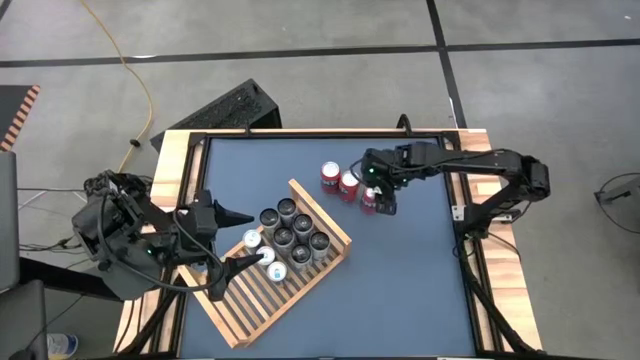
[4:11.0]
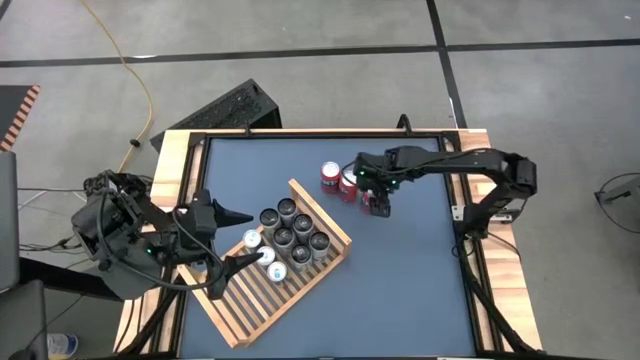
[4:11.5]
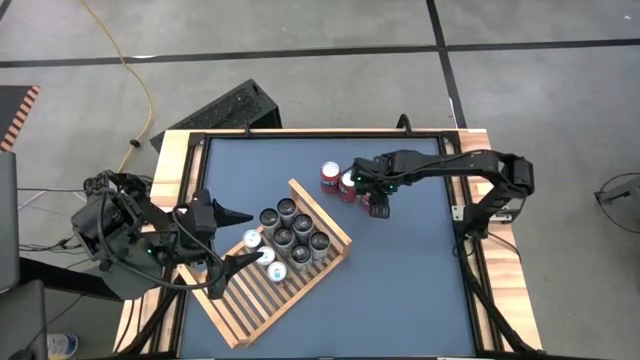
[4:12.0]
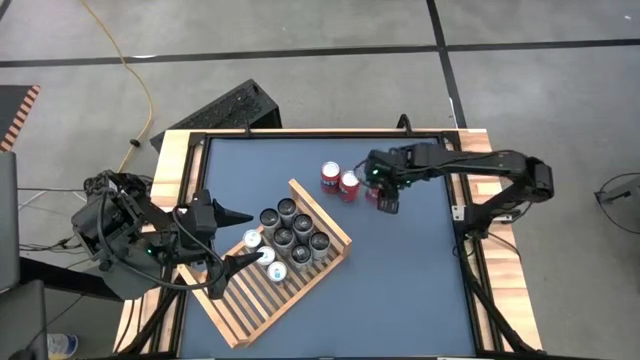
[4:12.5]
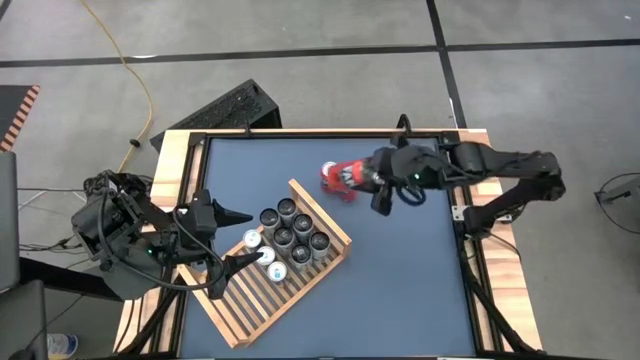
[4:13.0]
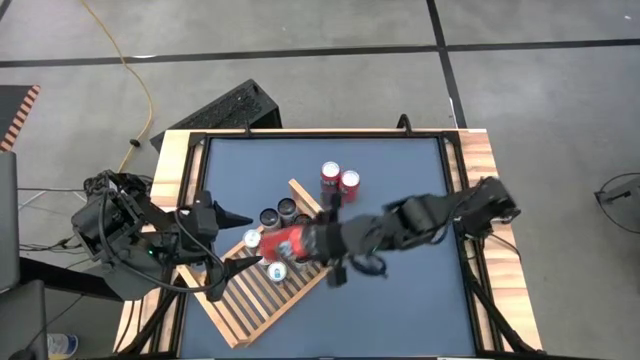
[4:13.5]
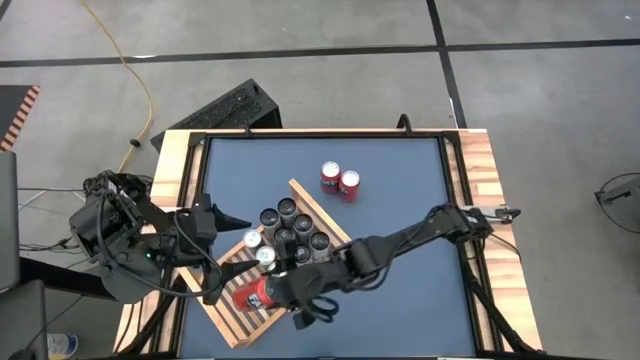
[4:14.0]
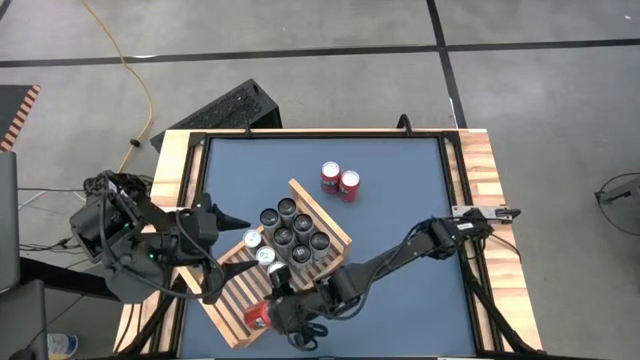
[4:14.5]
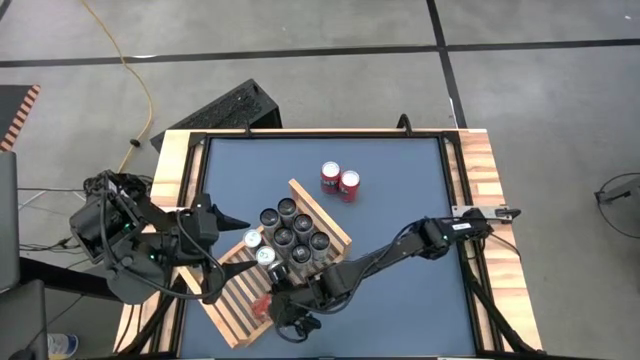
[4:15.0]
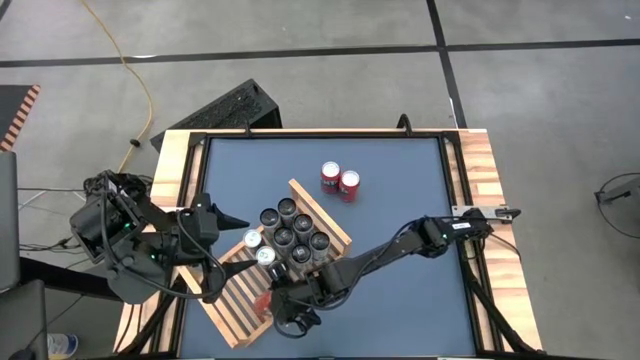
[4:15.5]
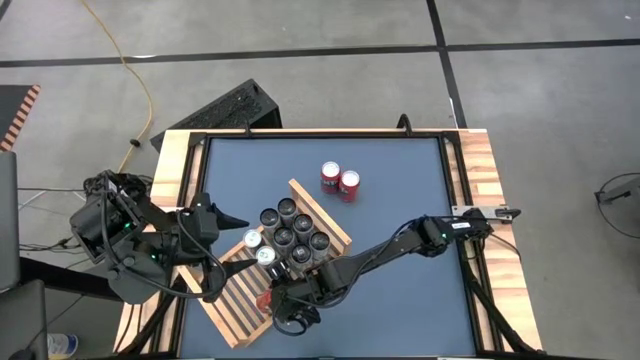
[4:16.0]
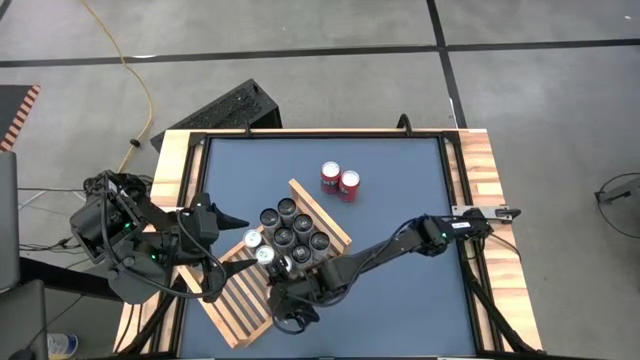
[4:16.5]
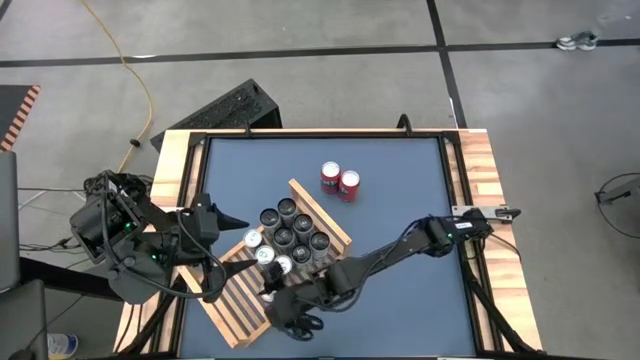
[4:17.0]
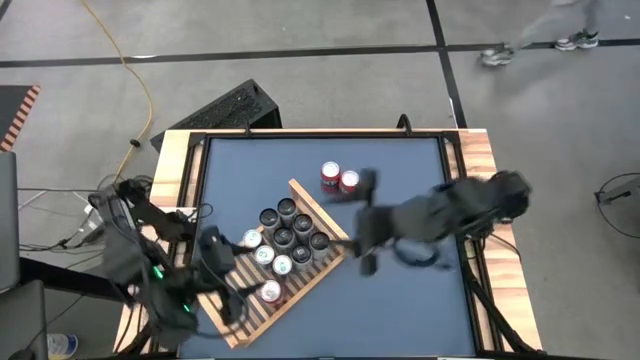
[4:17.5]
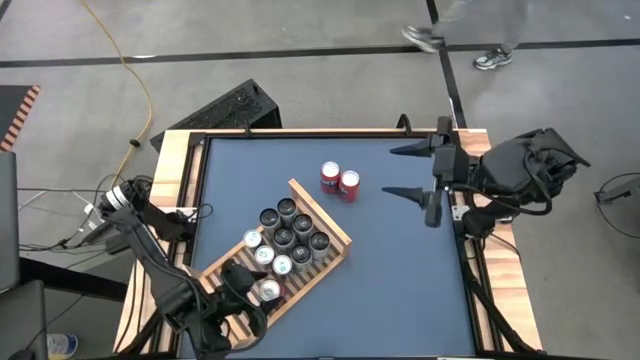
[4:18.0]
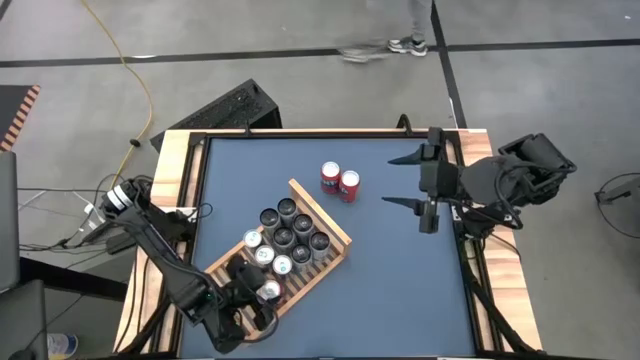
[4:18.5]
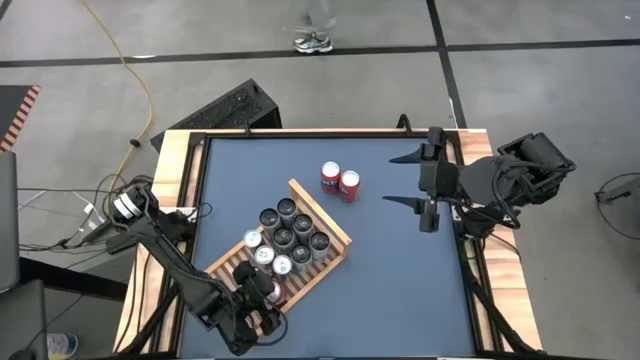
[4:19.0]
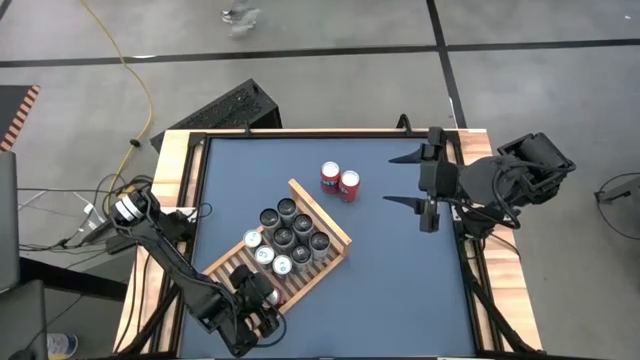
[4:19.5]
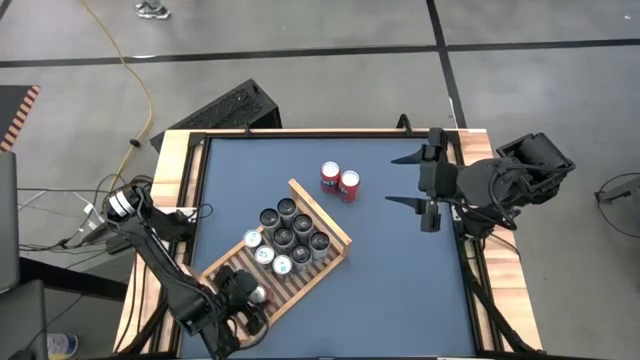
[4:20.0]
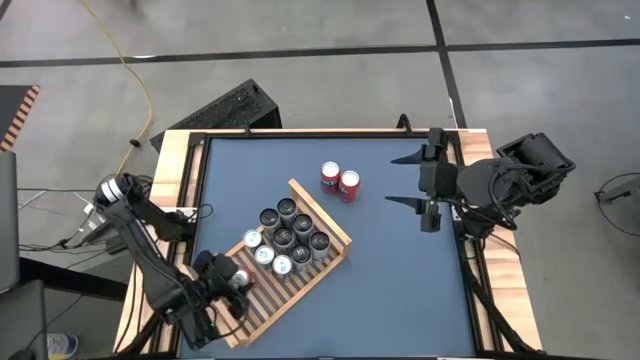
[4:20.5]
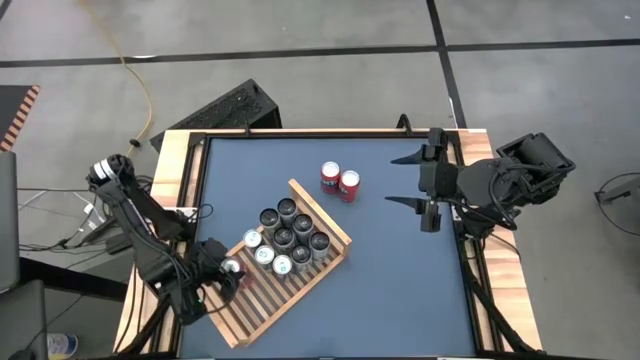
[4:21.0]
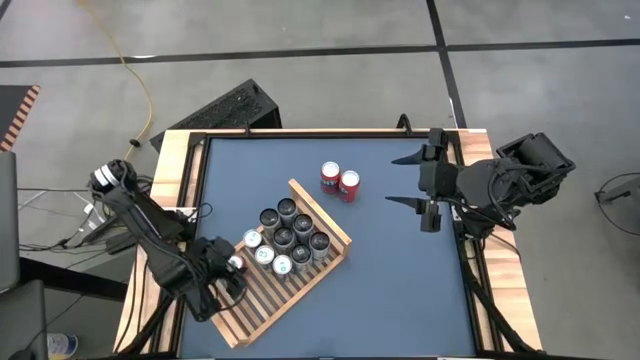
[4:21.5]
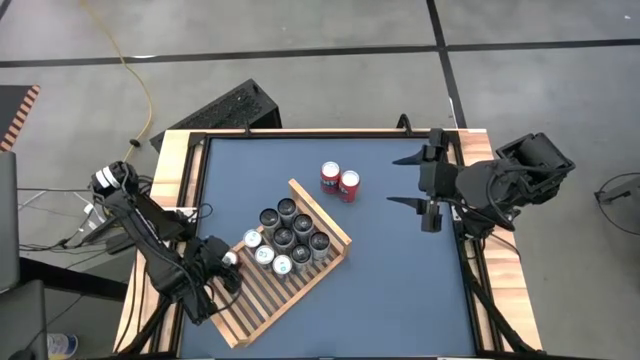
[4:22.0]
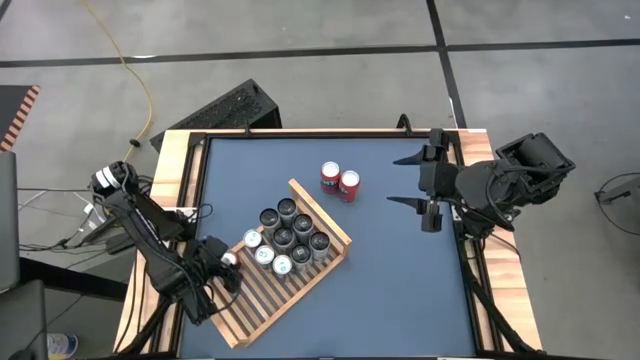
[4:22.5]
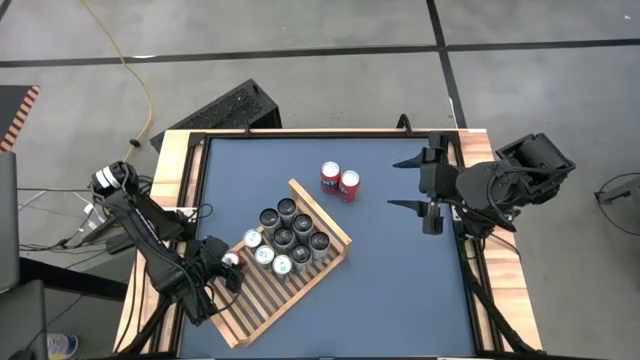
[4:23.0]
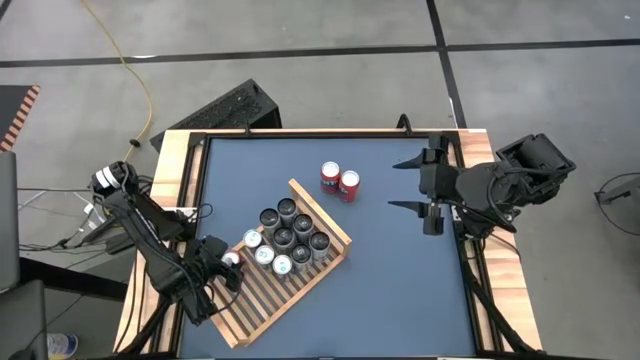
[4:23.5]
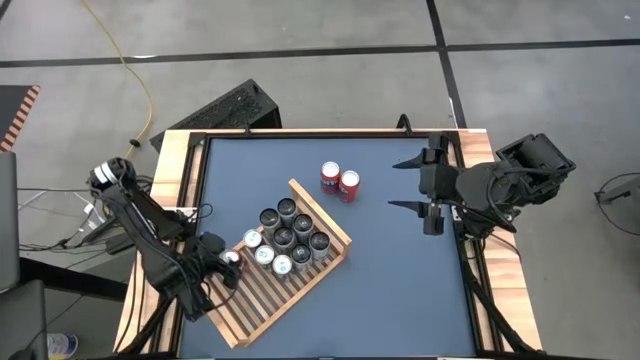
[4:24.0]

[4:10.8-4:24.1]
Task: Place canned beverage on shelf
Put the bottom red soda can on the shelf

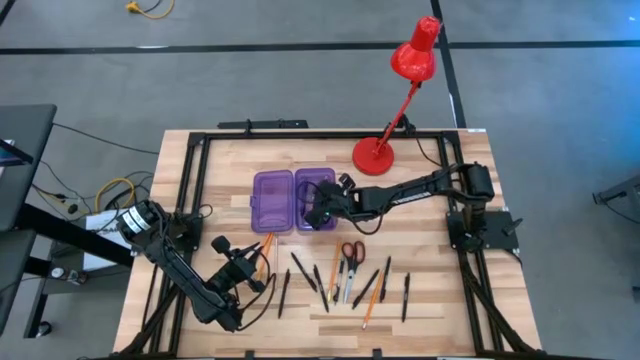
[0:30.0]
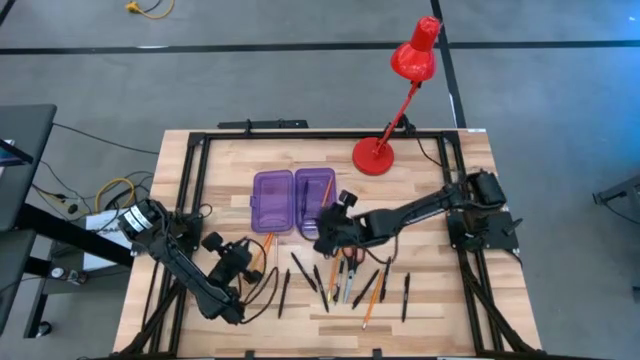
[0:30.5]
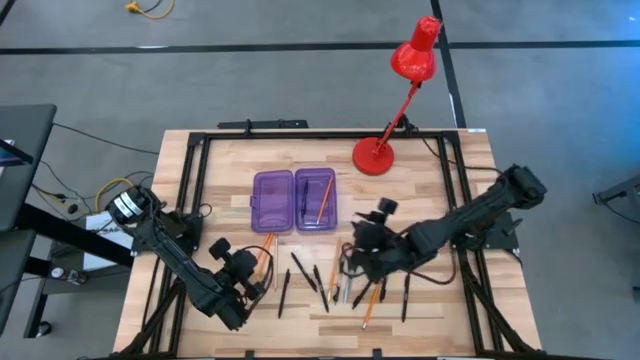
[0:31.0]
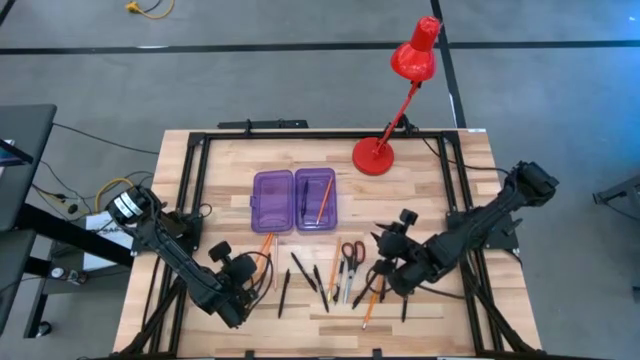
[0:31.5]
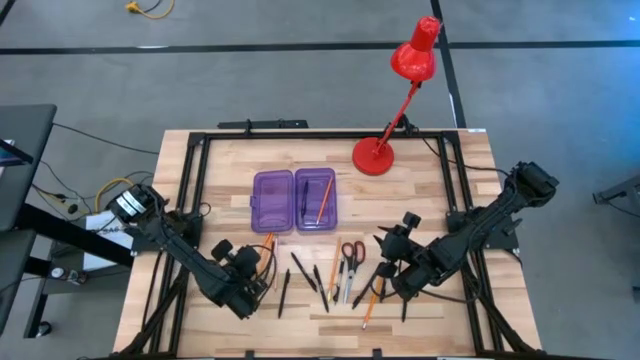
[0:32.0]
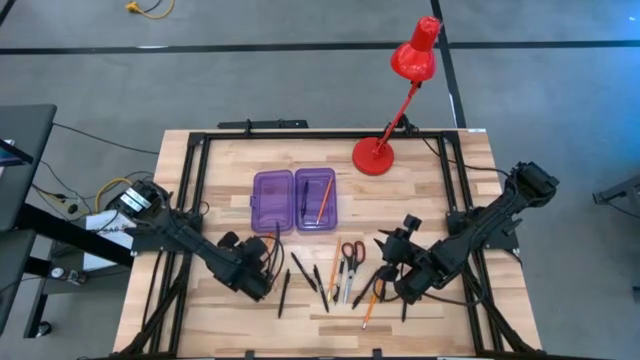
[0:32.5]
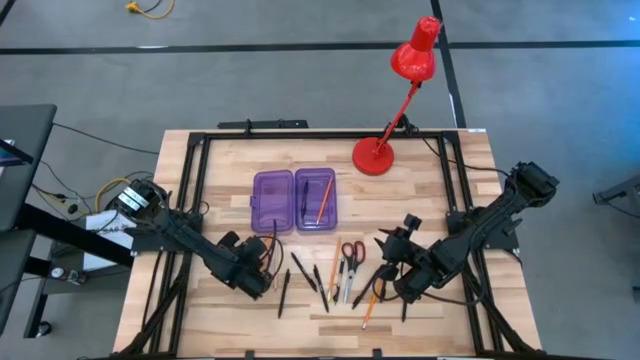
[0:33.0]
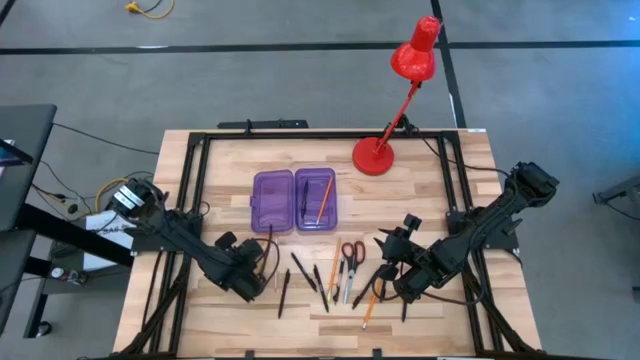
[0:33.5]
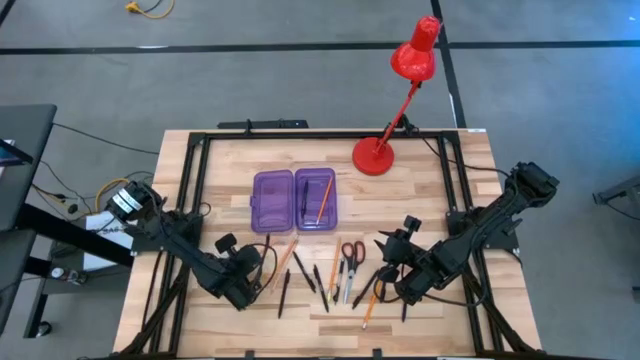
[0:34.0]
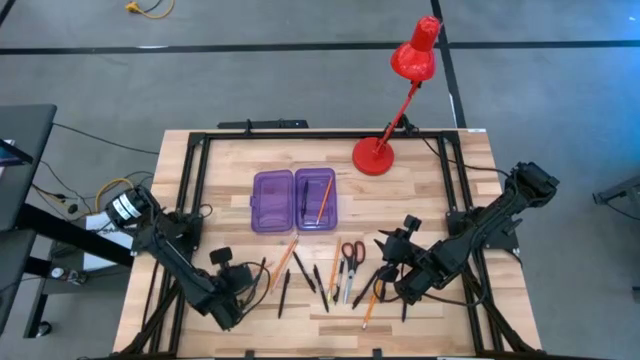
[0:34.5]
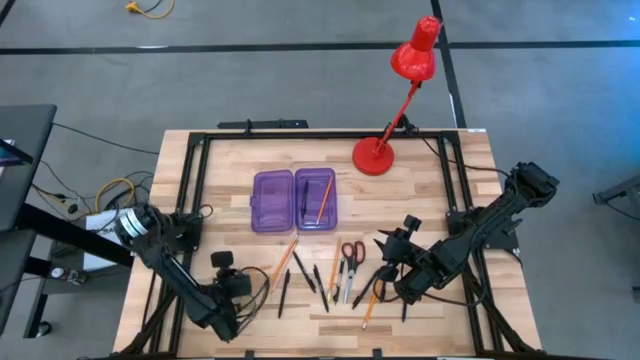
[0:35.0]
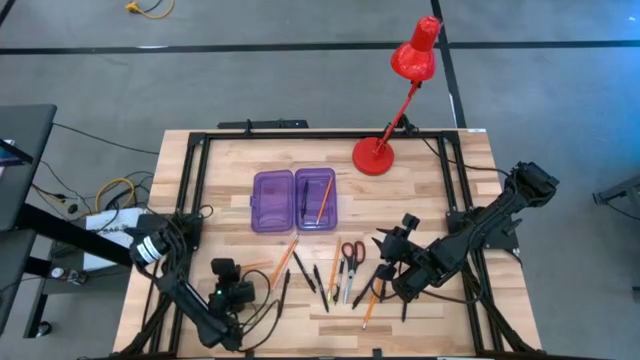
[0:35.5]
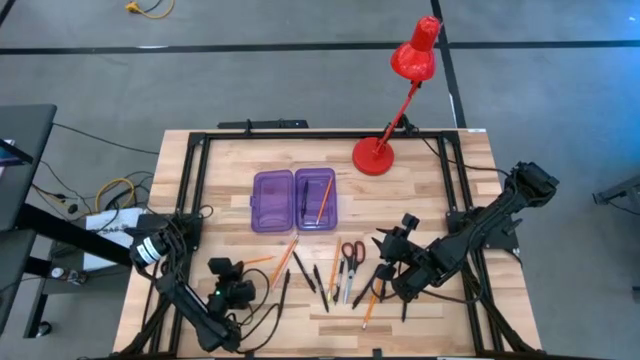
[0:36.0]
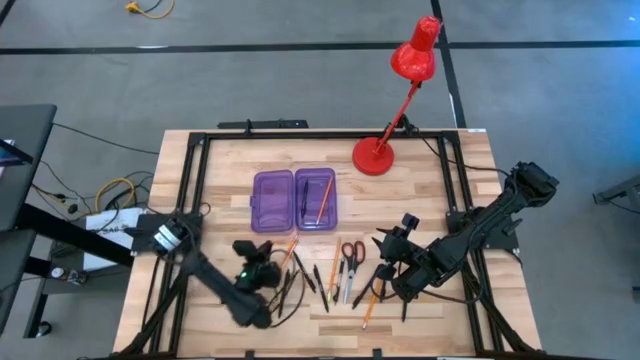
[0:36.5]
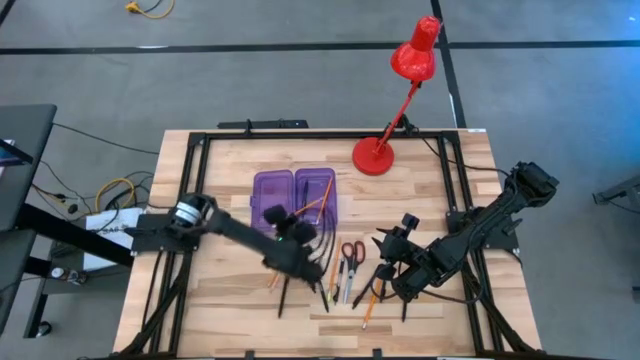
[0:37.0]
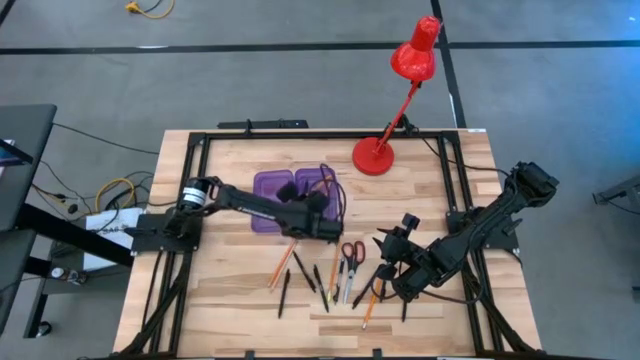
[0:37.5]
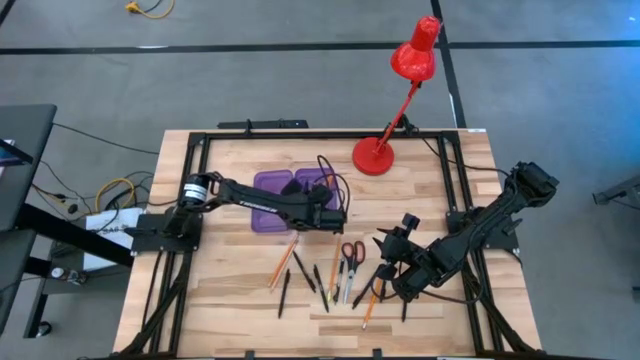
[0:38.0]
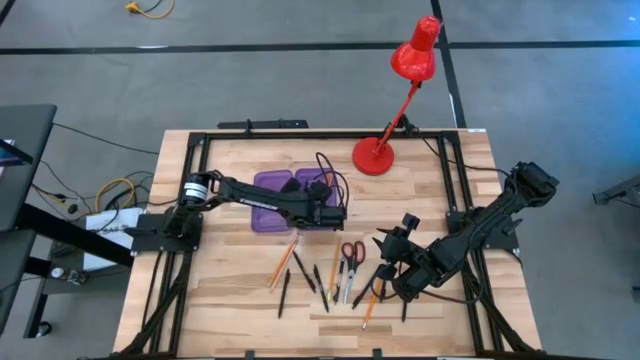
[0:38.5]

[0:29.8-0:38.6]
Task: Pick & place school supplies into a supply box
Put the orange pencil into the violet supply box
